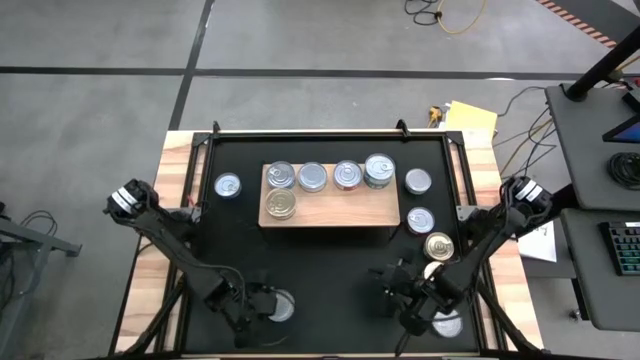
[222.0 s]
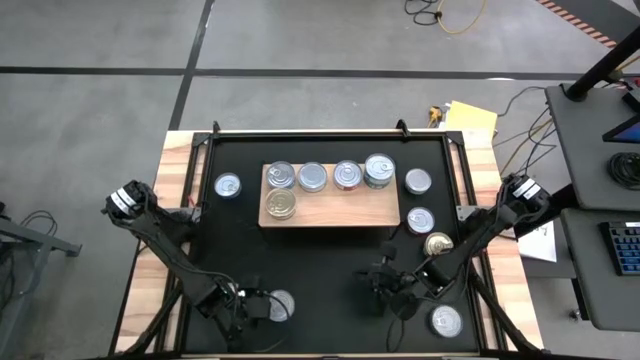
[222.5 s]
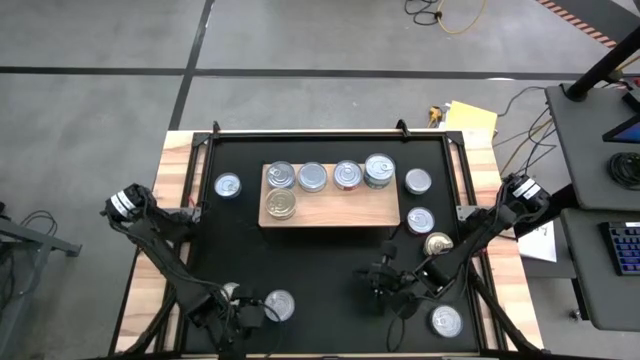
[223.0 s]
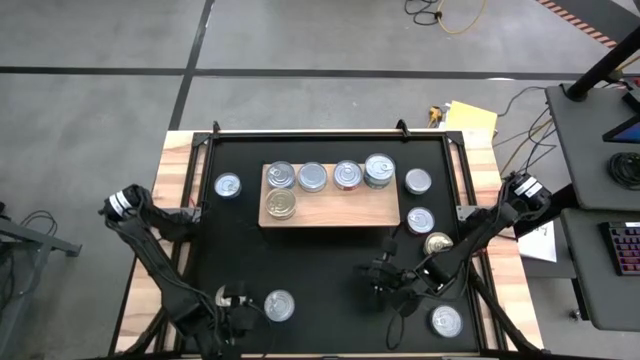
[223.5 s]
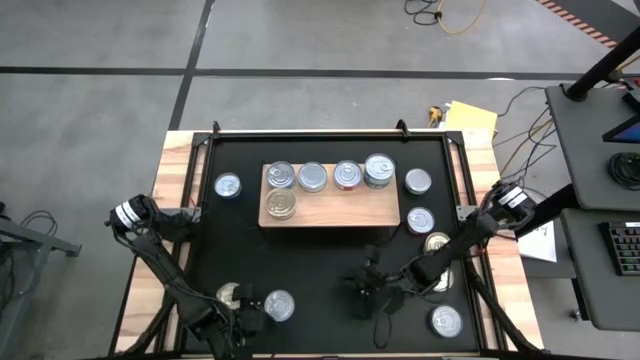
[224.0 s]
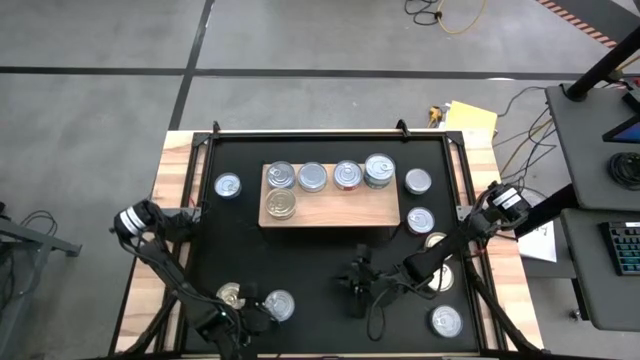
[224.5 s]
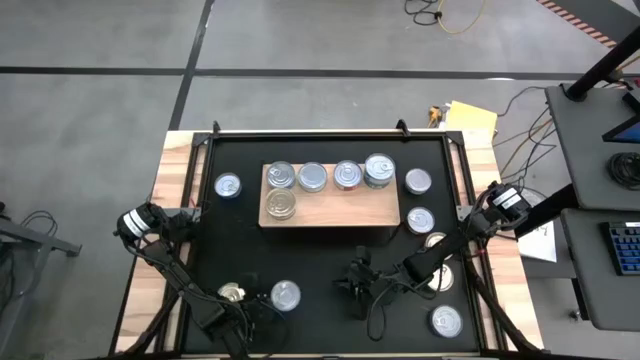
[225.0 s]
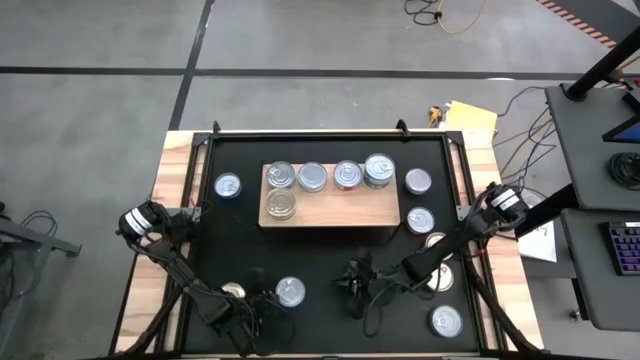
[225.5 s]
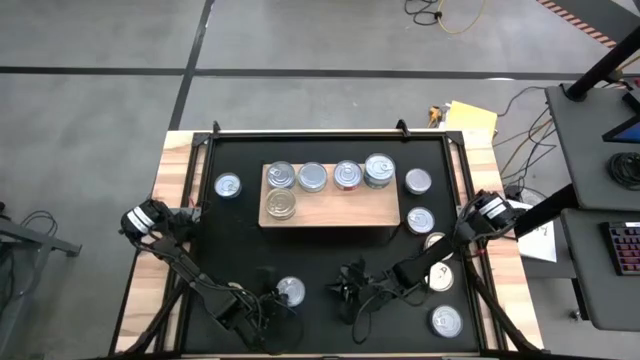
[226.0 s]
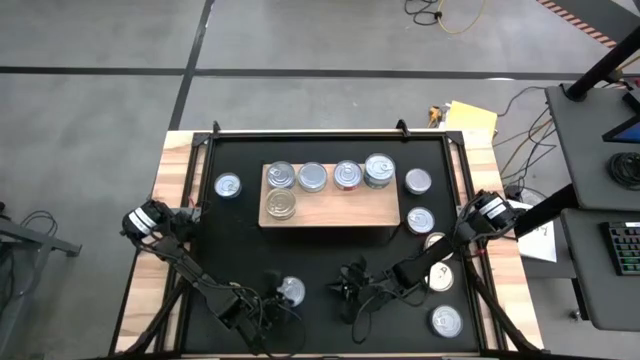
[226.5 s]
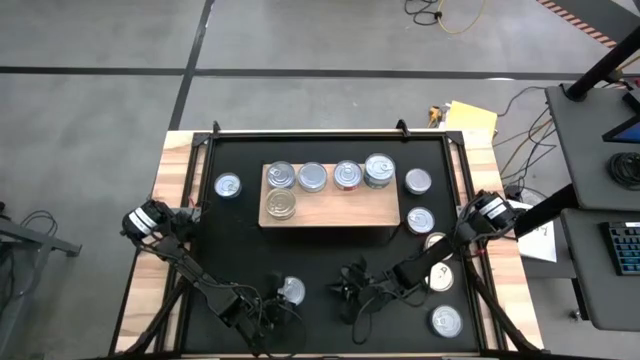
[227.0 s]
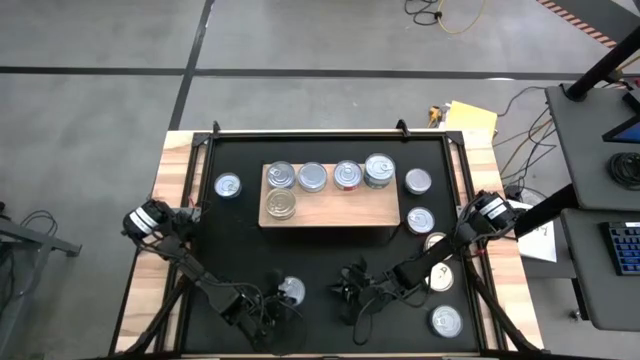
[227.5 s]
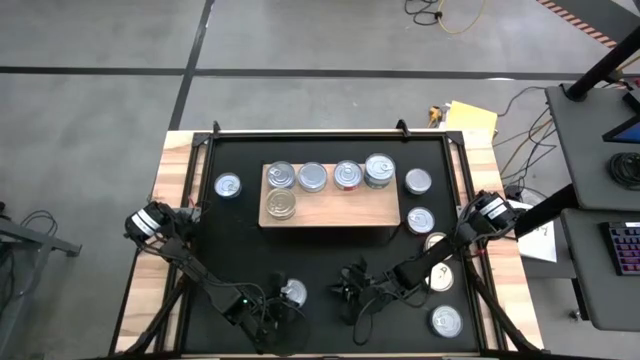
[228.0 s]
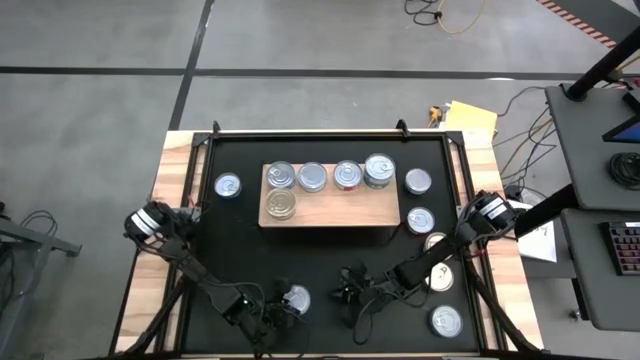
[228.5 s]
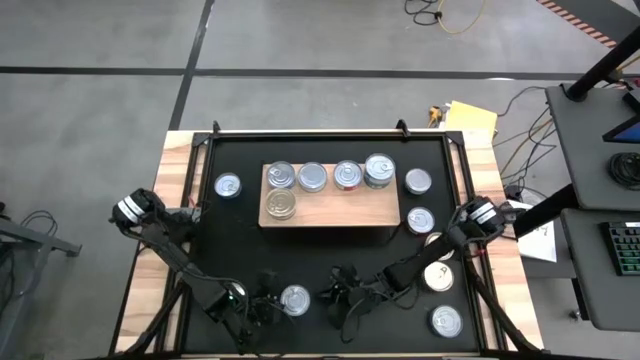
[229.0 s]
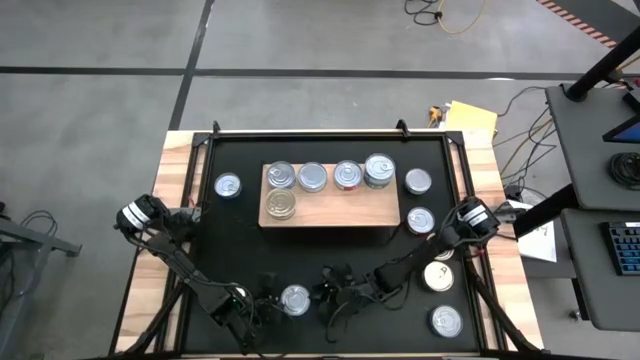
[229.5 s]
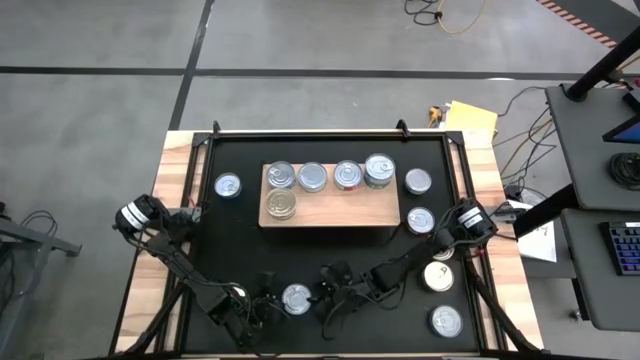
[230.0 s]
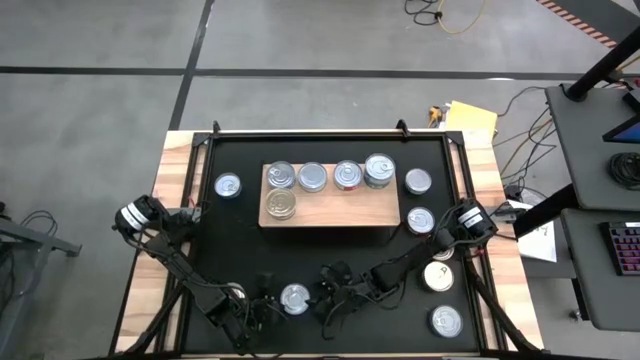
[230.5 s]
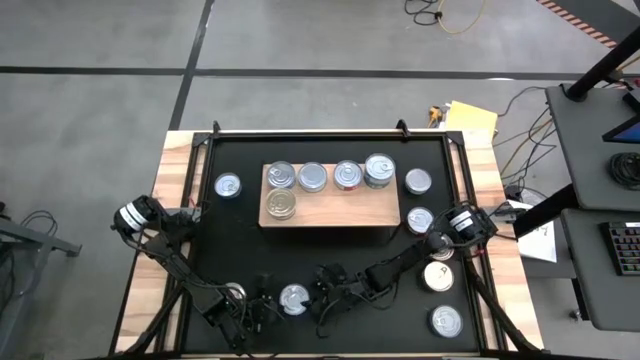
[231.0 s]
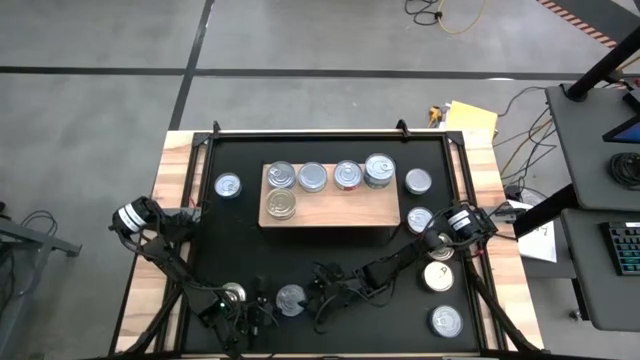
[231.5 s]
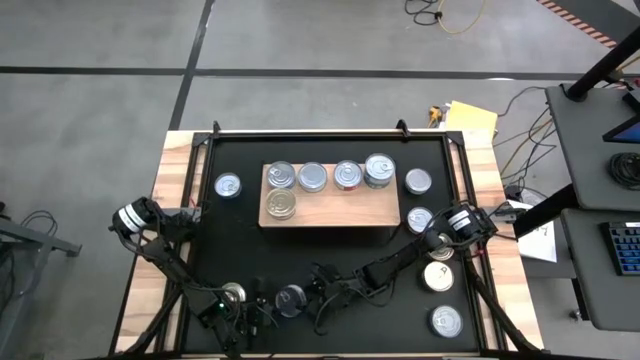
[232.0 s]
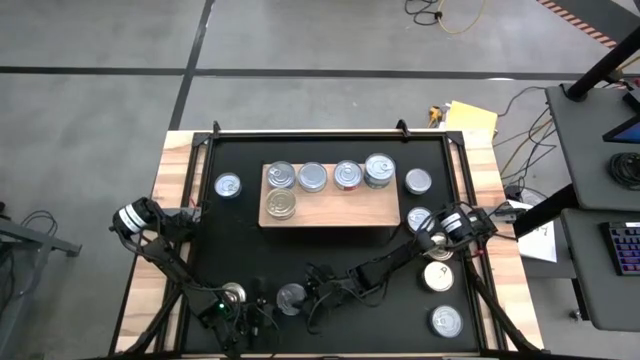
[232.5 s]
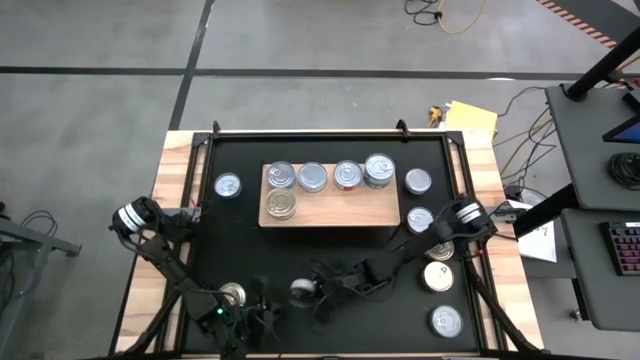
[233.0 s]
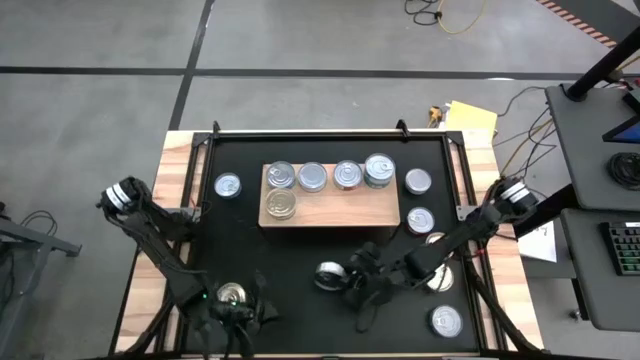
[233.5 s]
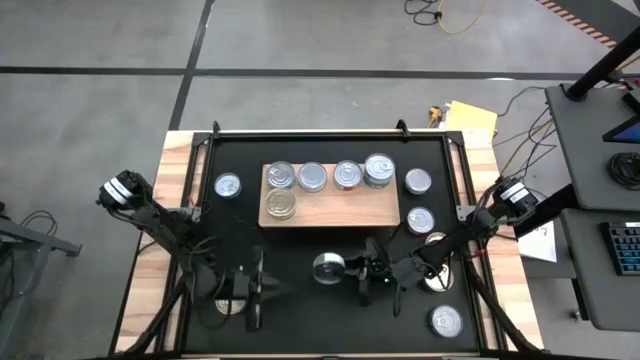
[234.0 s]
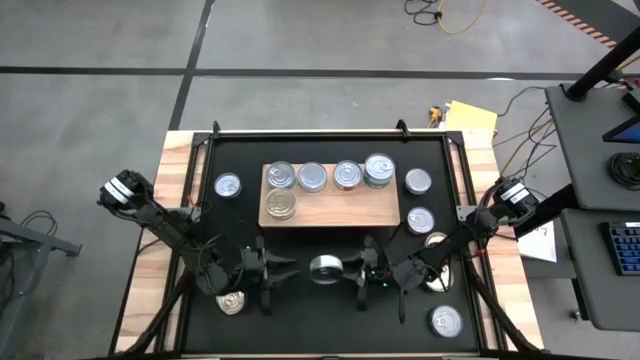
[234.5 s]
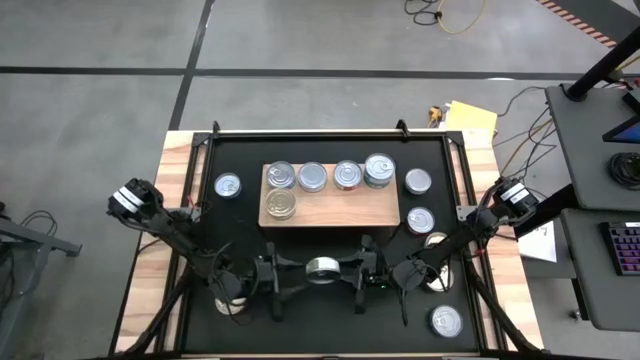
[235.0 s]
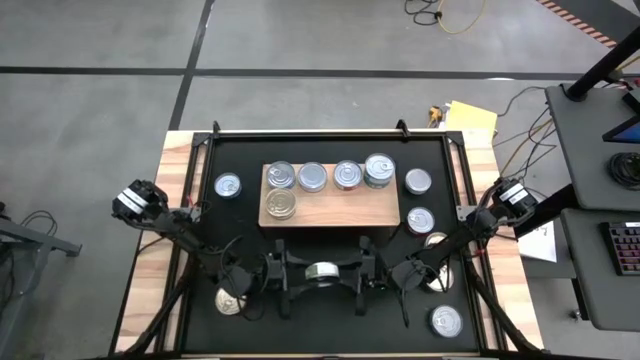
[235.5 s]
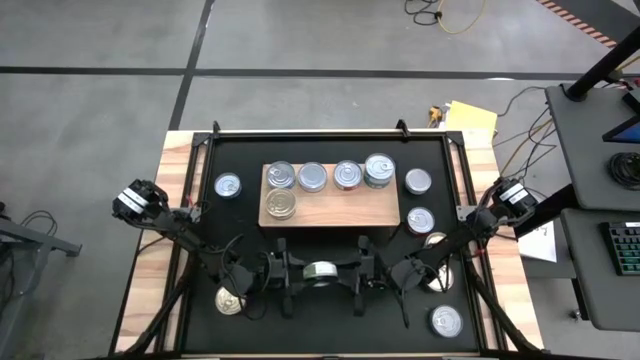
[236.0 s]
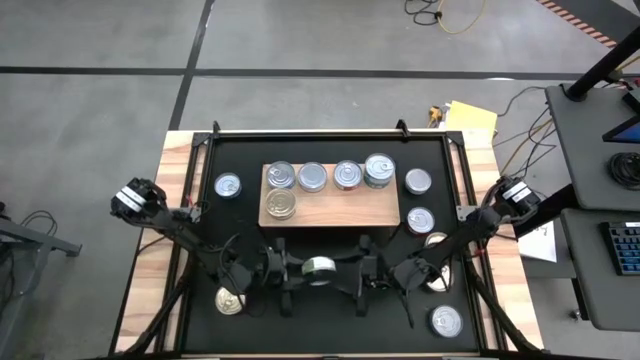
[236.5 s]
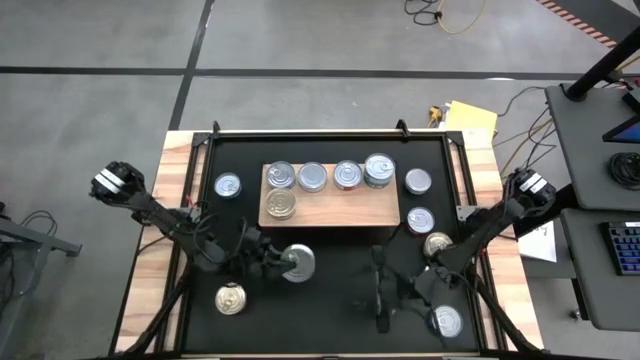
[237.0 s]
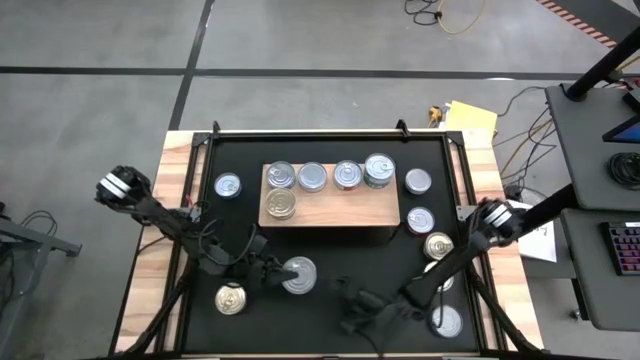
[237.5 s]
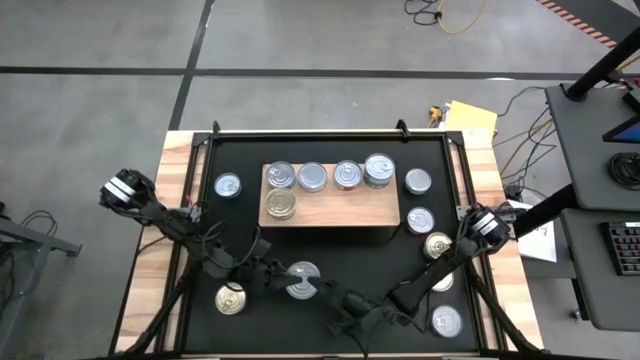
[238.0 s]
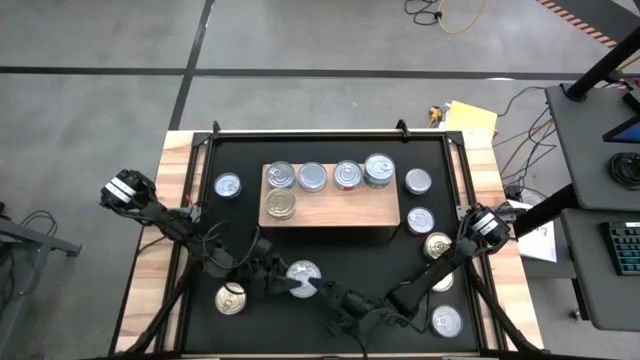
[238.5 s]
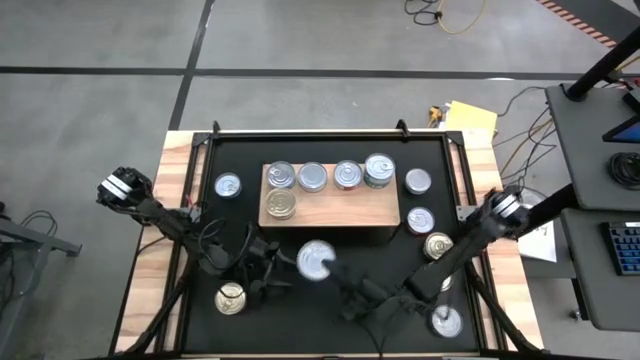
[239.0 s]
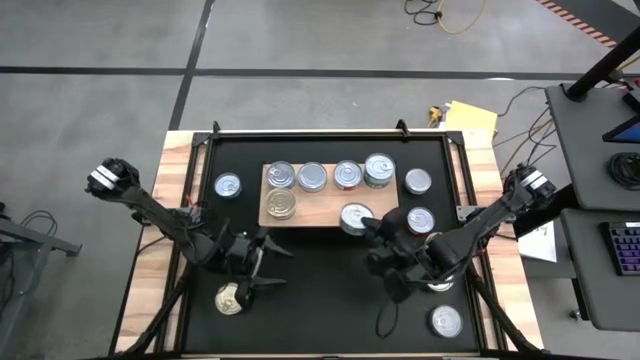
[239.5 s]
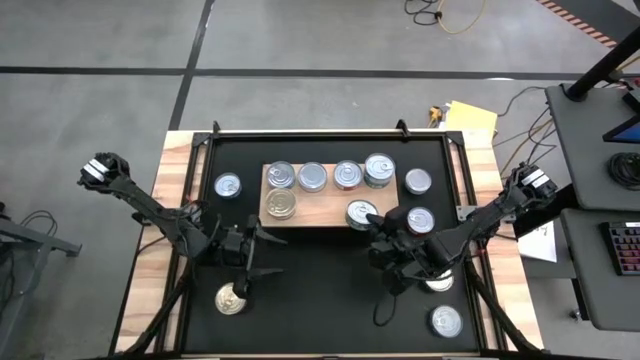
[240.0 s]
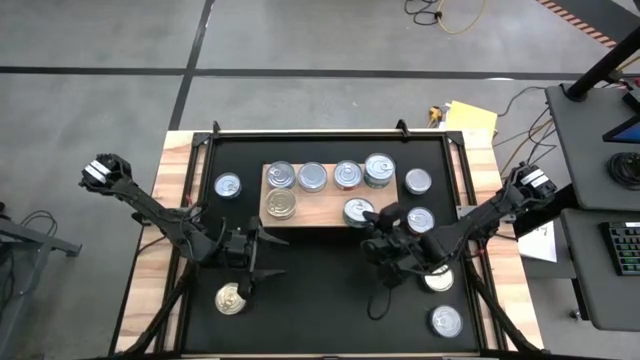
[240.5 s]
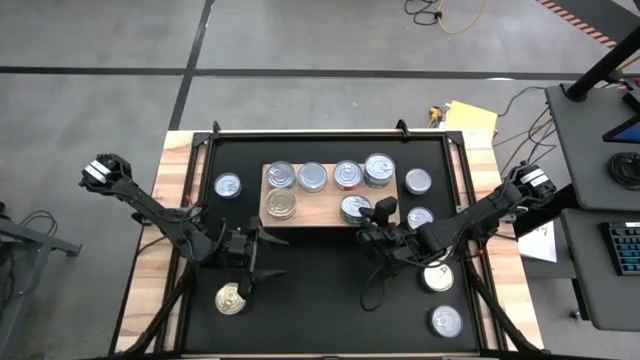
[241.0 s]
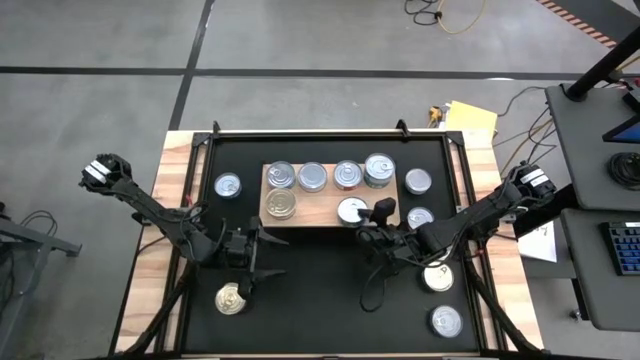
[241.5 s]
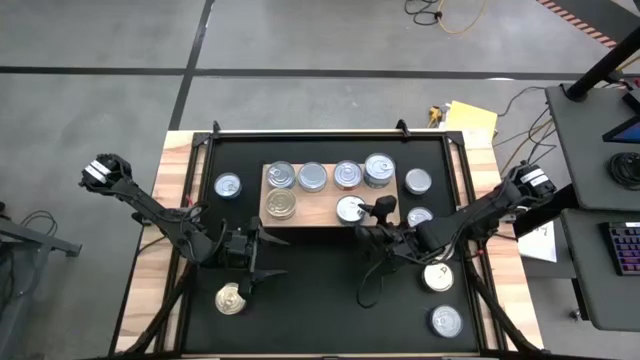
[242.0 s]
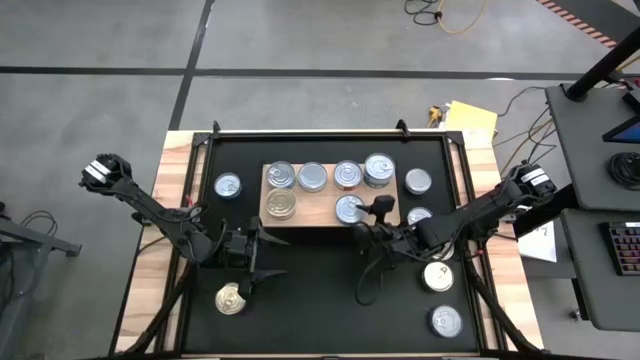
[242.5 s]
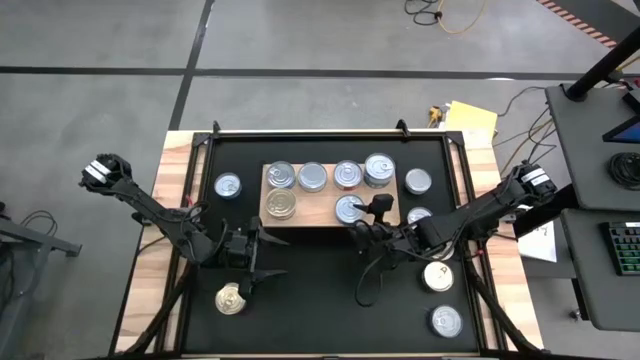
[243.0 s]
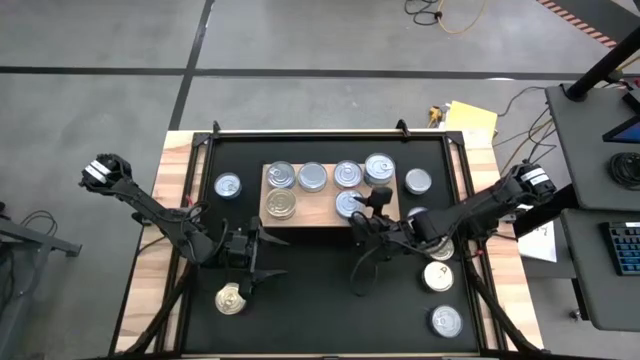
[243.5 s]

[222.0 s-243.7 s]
Task: Stack canned seafood by type on shelf
Put the green tuna can on the shelf
